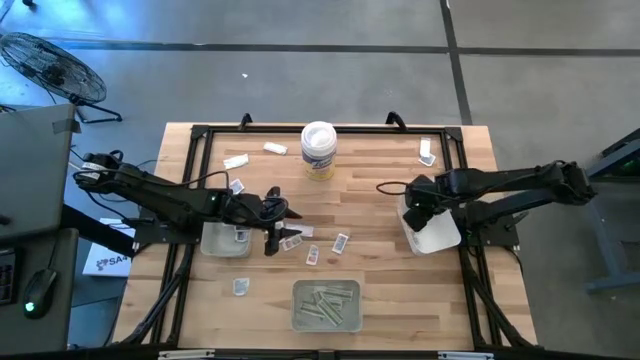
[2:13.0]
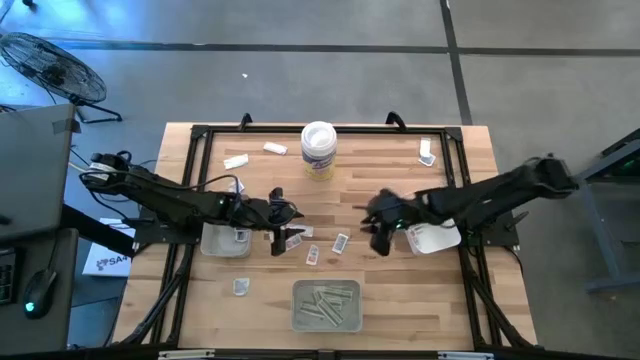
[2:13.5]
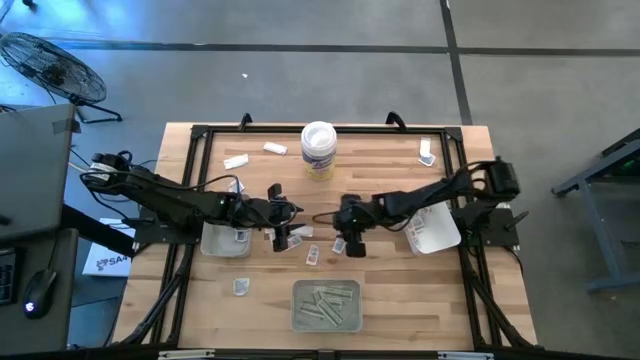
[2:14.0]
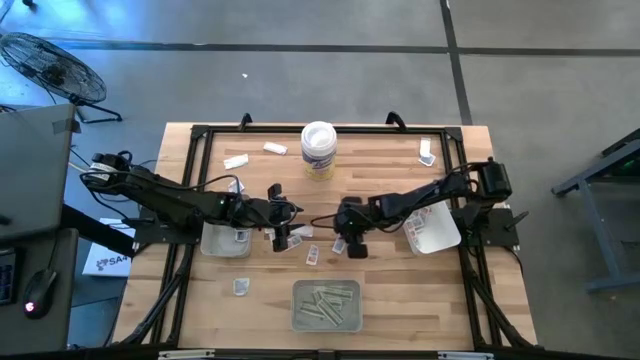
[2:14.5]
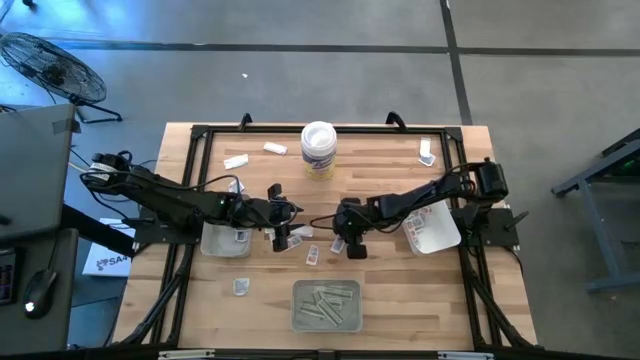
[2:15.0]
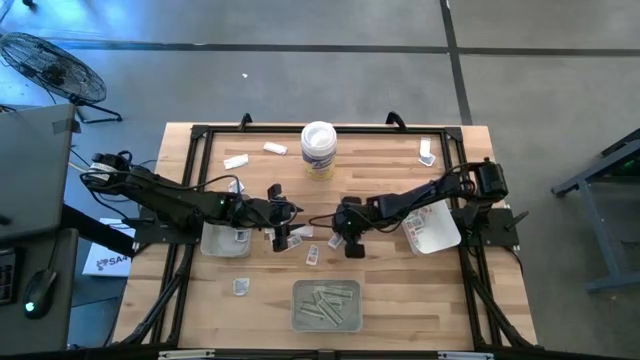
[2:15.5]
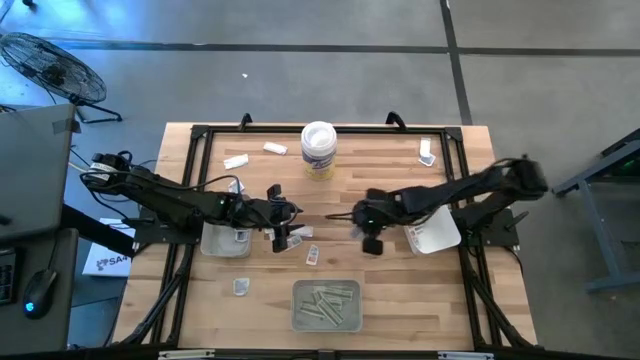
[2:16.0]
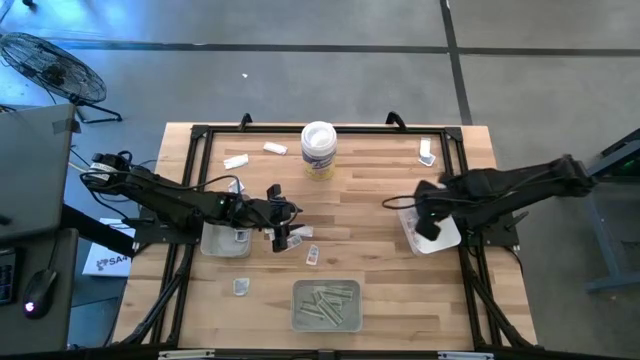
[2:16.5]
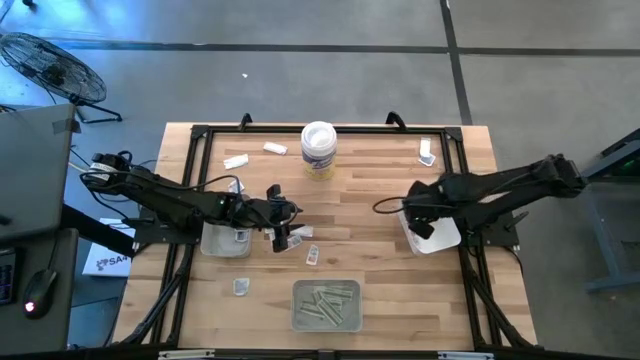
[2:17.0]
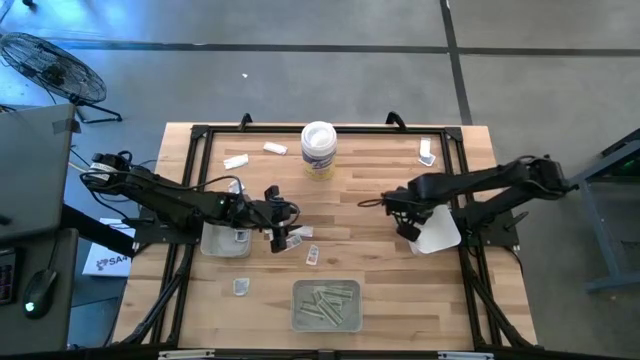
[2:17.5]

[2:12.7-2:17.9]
Task: Pick & Place First Aid Supplies
Put the orange ointment pack into the white bin

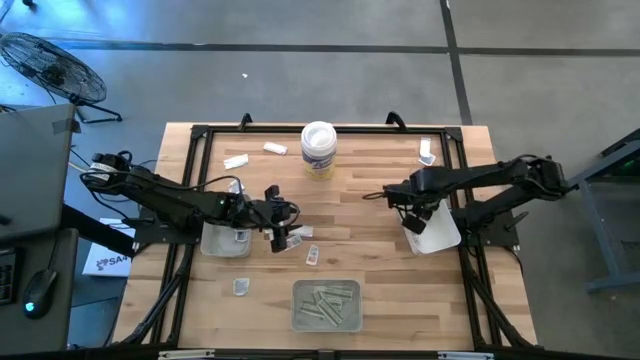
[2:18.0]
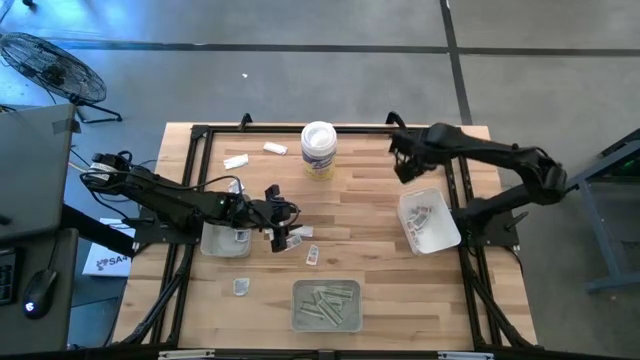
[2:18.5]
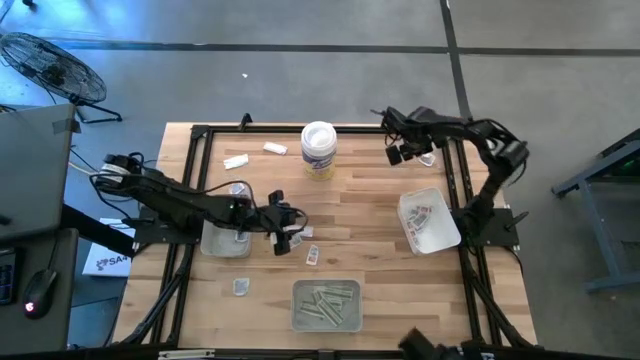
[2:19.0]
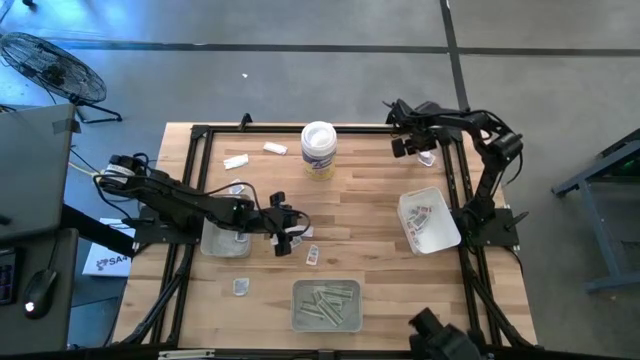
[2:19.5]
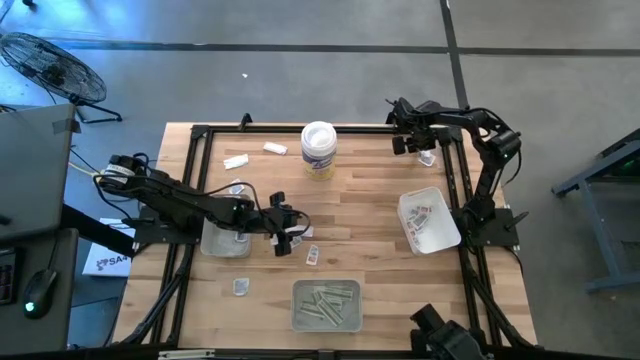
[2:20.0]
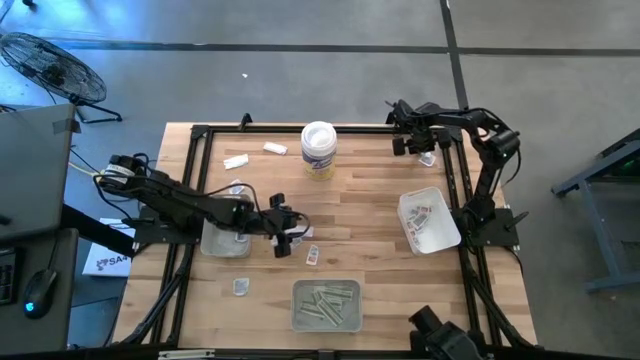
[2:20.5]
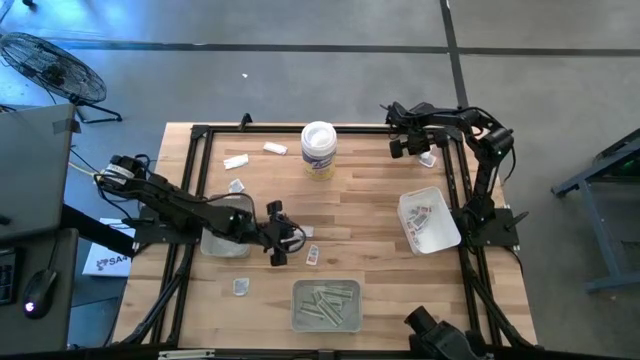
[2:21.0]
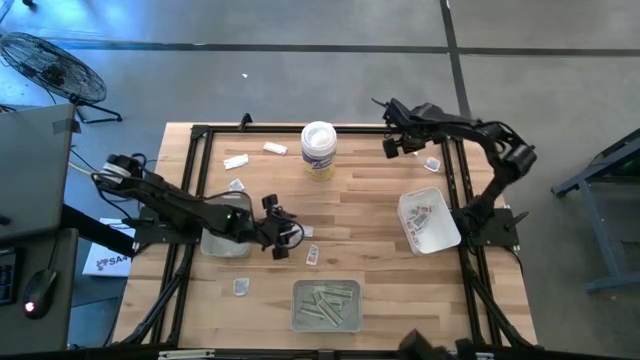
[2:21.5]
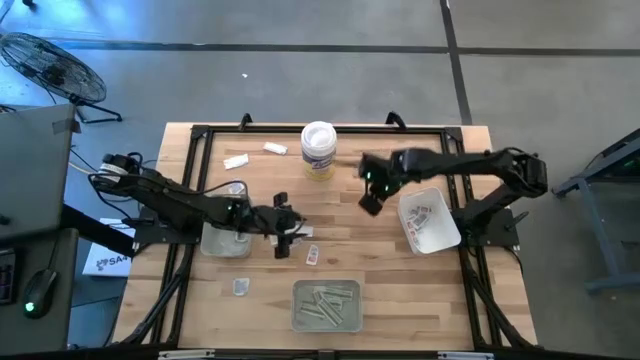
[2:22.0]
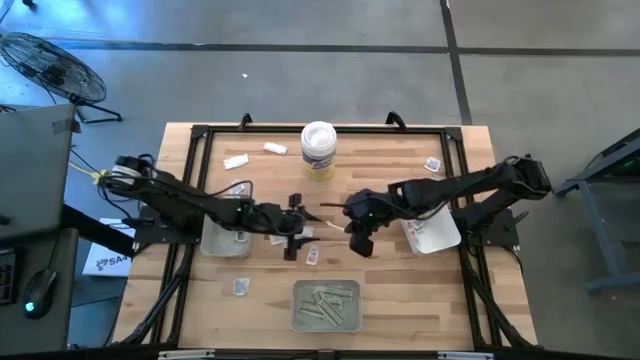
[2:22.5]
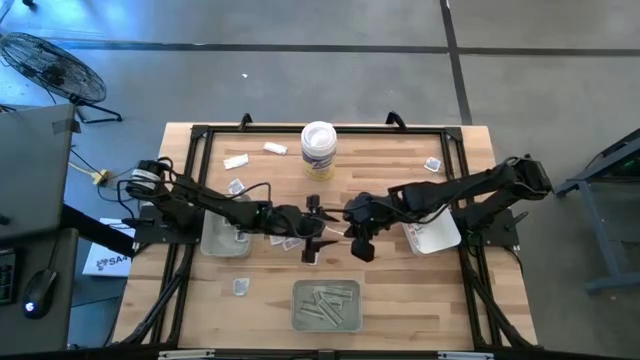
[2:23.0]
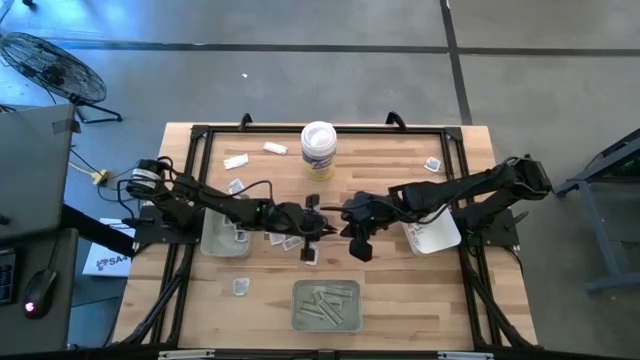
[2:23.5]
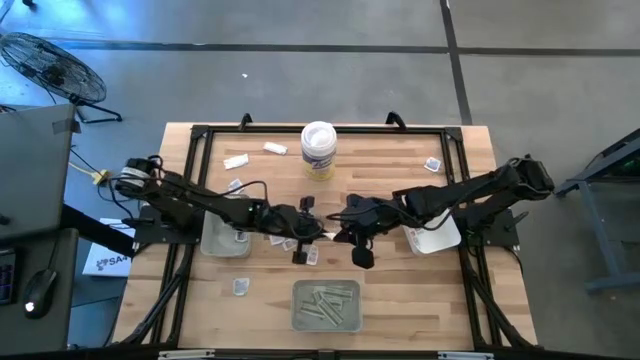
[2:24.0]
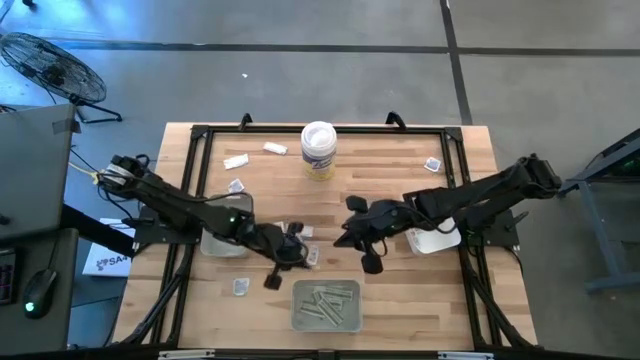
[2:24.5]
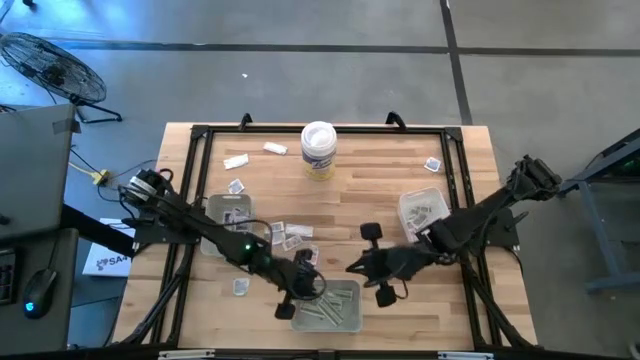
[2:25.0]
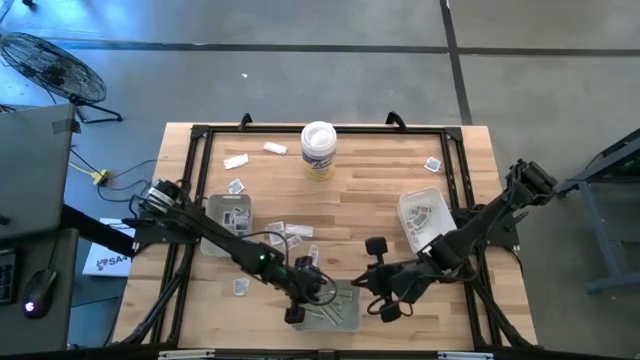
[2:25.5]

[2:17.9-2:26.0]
Put the green bandage pack into the bottom gray bin

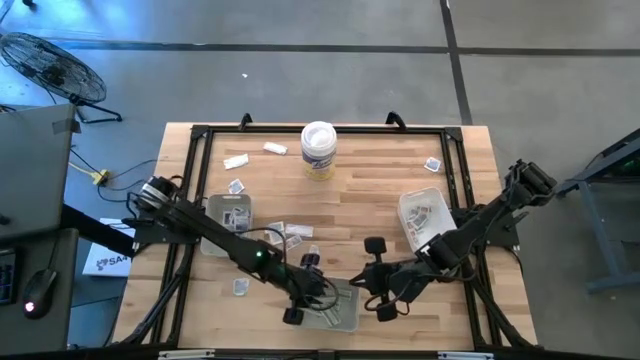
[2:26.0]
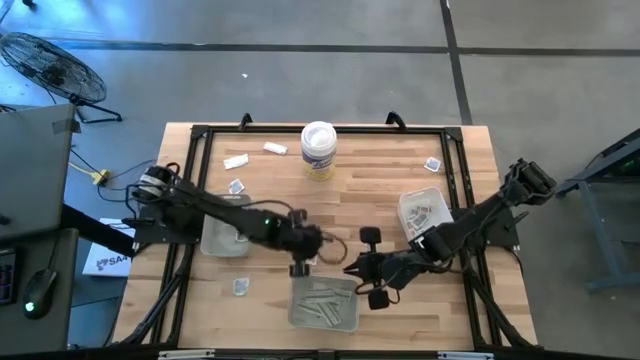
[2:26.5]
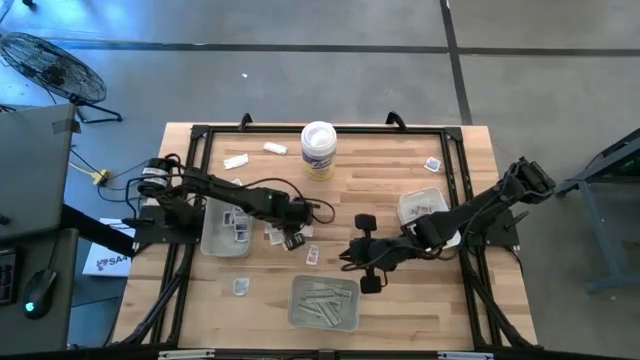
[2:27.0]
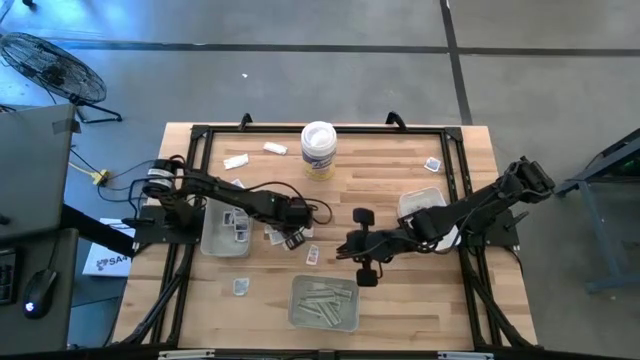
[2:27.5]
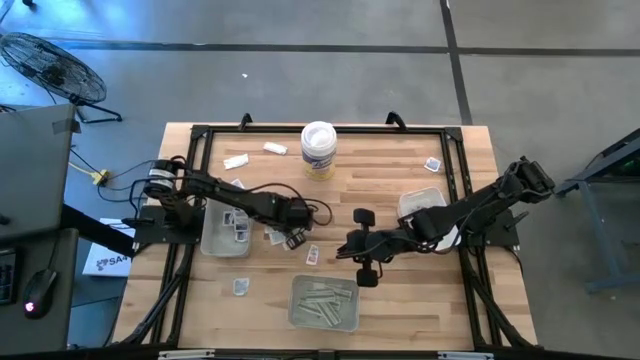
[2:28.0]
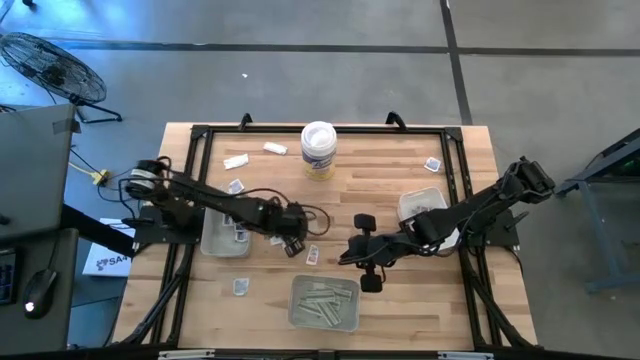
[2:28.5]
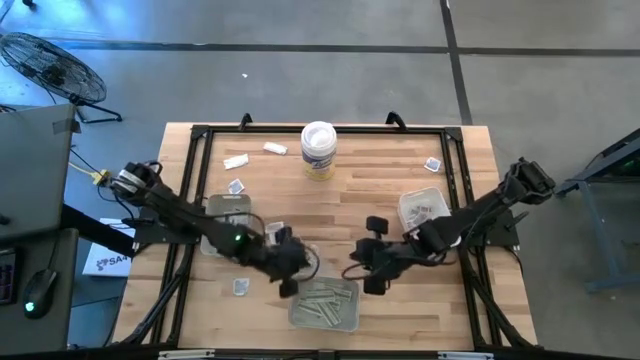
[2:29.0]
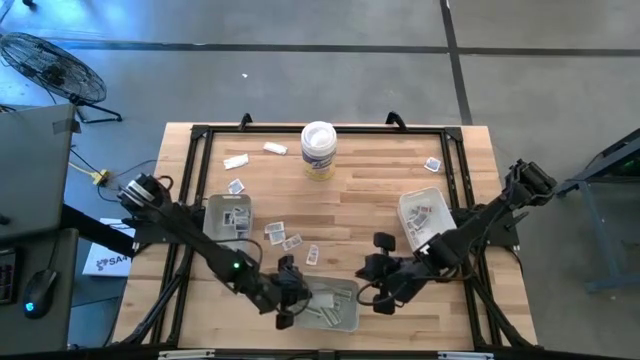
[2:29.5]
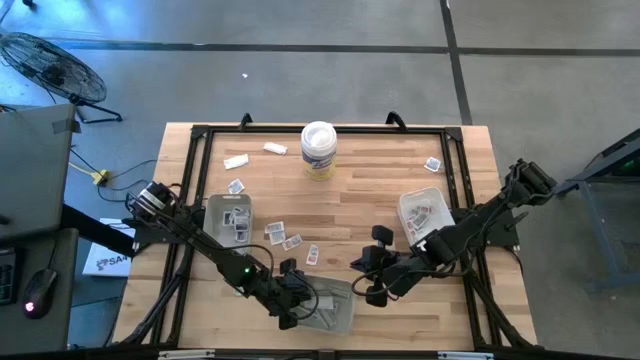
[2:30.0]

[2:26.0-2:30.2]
Put the green bandage pack into the bottom gray bin

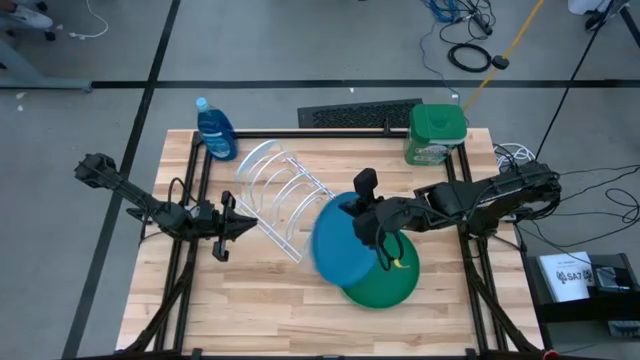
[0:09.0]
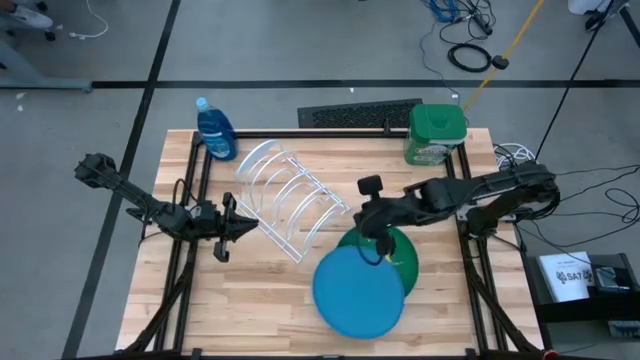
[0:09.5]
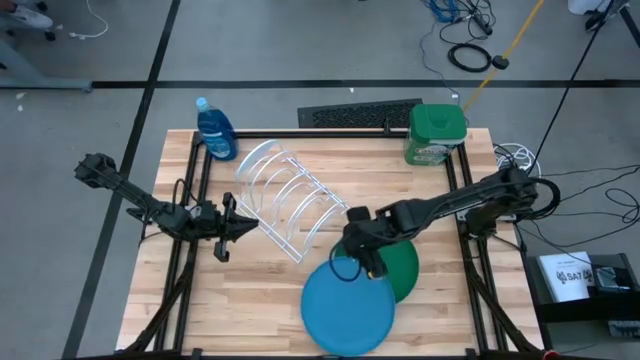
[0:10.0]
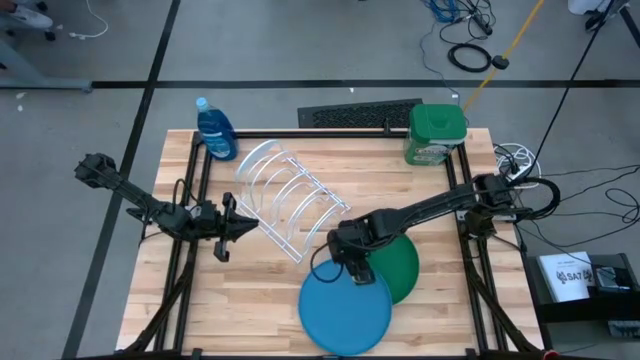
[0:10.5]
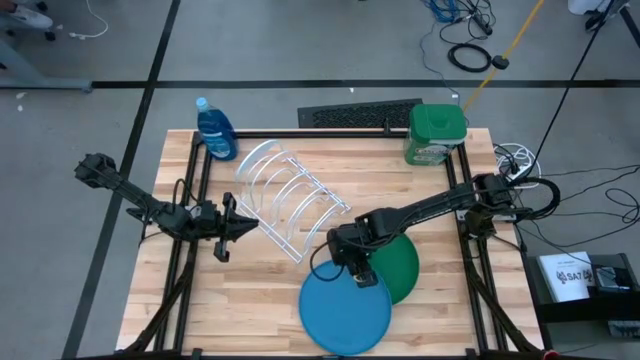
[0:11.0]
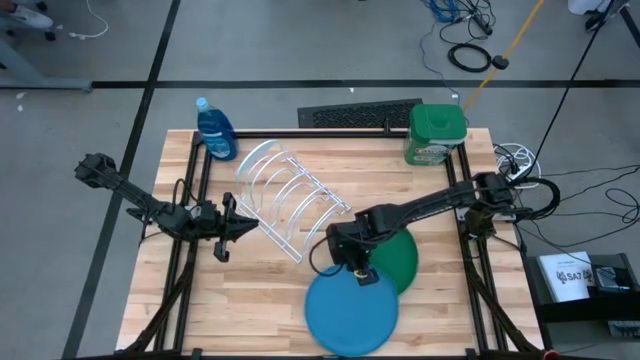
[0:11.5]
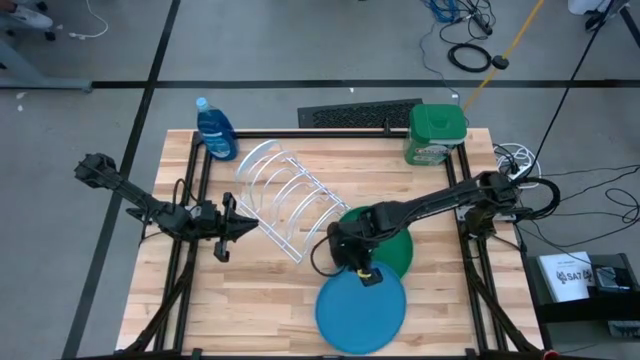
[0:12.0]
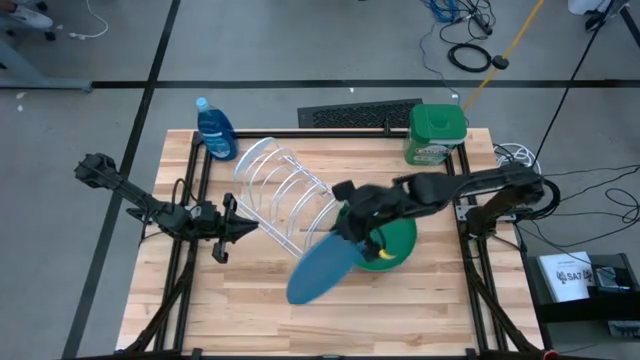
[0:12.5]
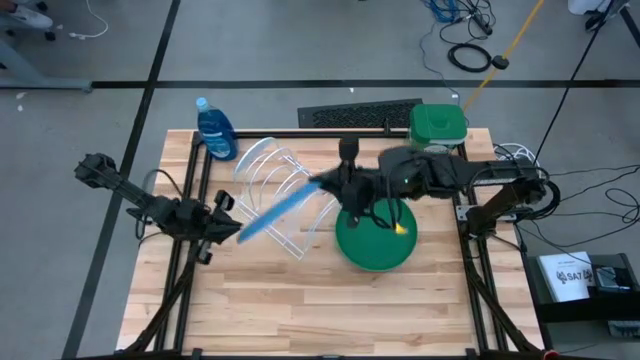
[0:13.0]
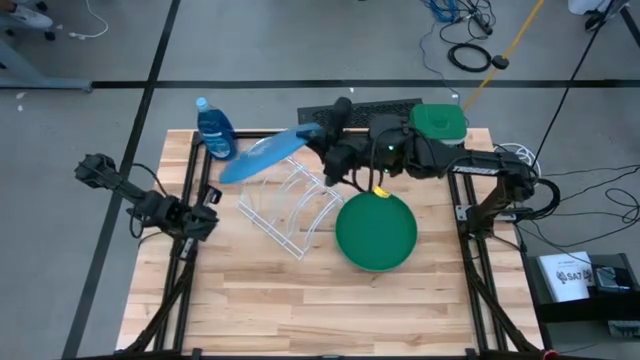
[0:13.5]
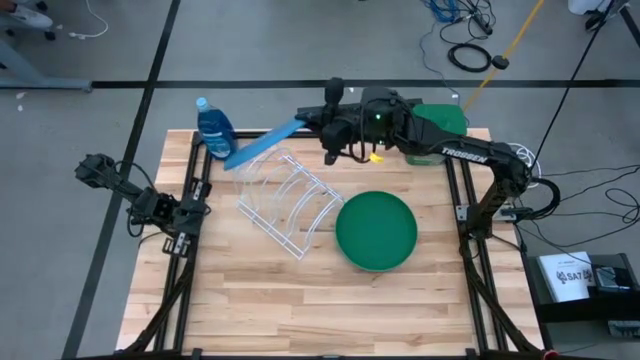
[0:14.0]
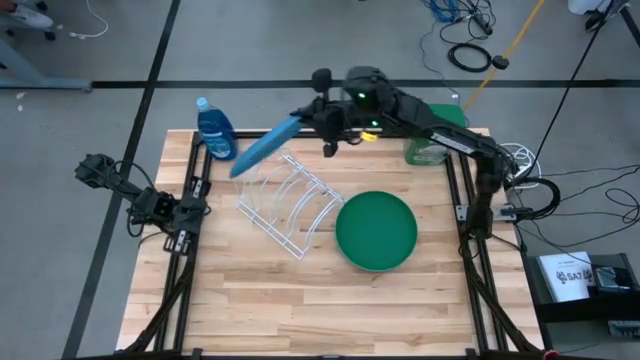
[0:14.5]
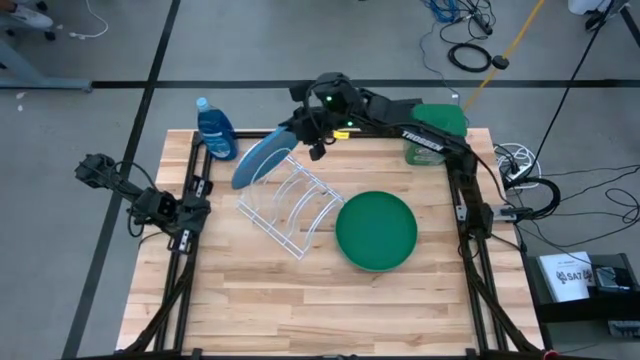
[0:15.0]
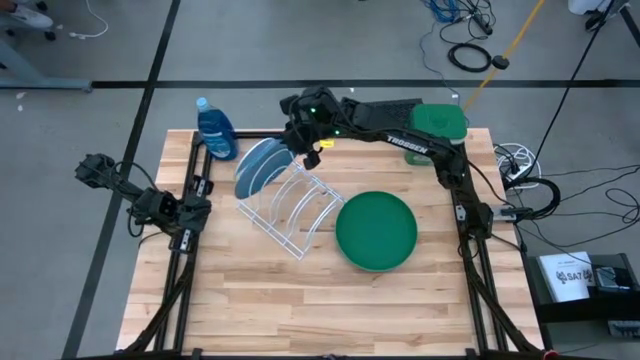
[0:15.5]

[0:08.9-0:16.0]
Task: Sort dishes
Put the blue plate on the dish rack
